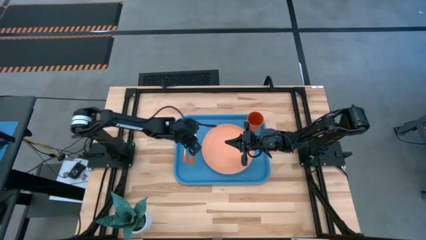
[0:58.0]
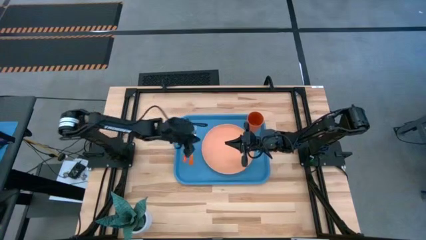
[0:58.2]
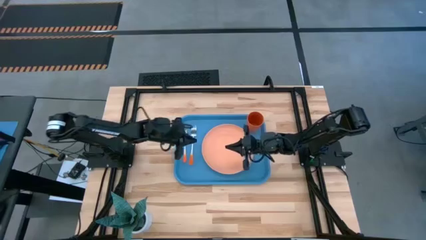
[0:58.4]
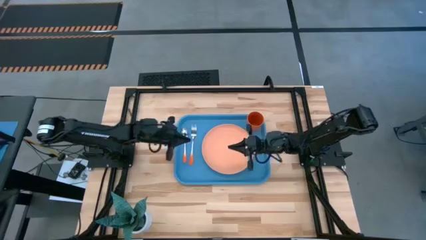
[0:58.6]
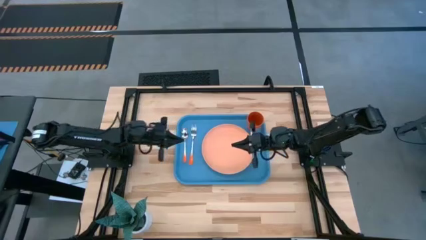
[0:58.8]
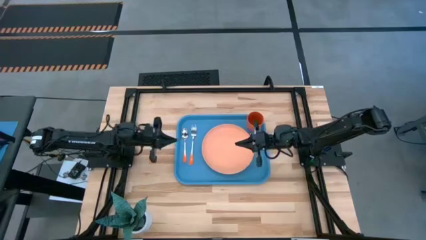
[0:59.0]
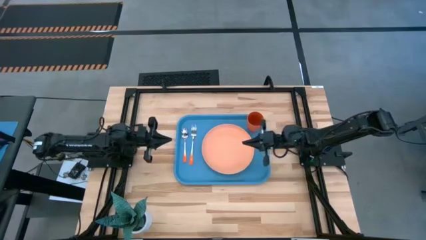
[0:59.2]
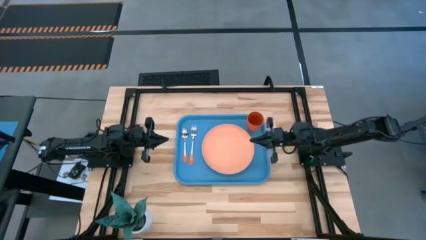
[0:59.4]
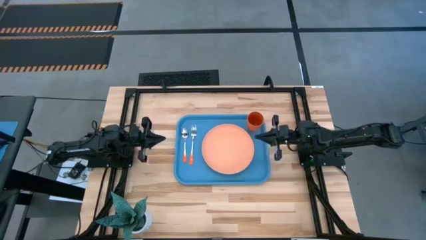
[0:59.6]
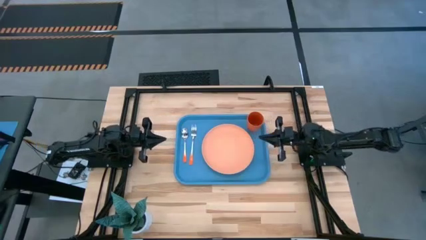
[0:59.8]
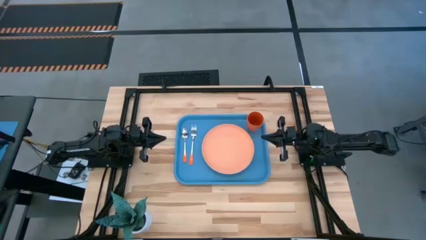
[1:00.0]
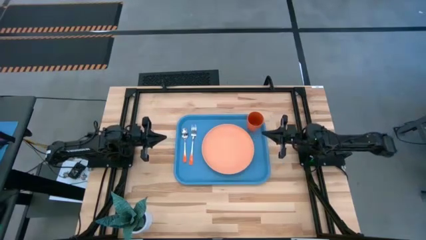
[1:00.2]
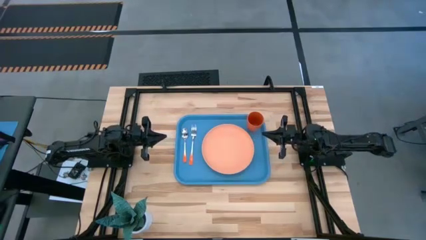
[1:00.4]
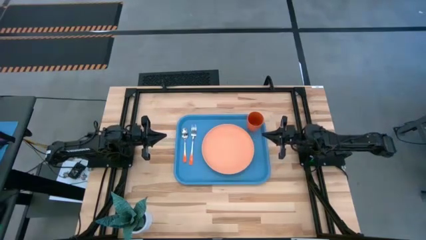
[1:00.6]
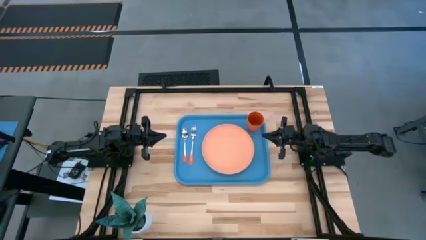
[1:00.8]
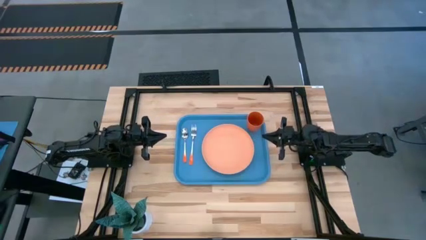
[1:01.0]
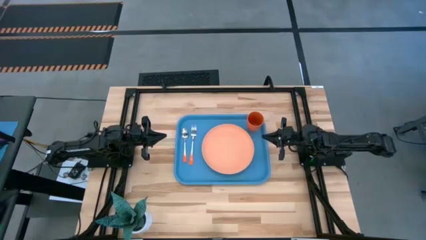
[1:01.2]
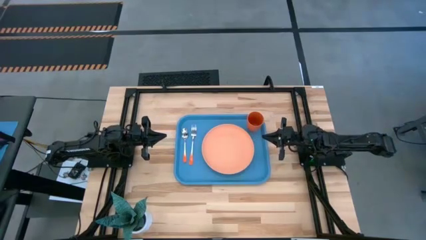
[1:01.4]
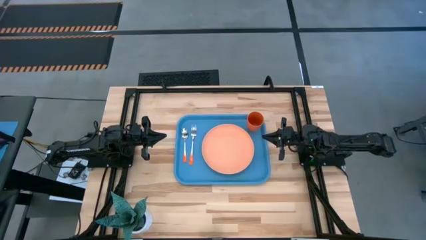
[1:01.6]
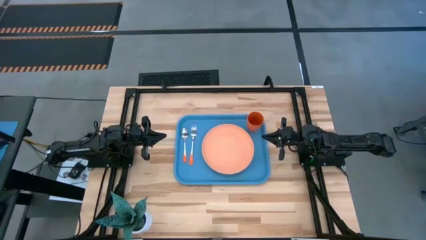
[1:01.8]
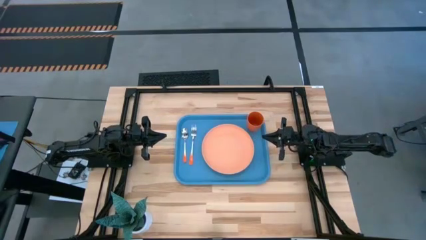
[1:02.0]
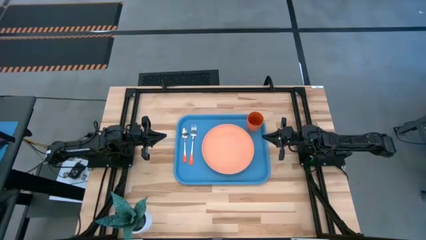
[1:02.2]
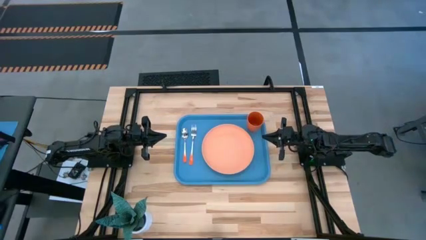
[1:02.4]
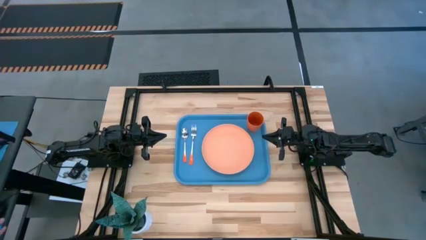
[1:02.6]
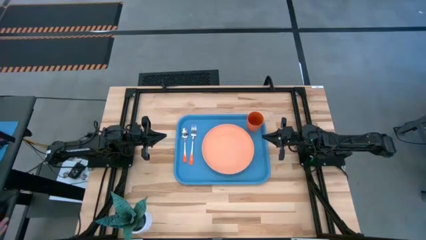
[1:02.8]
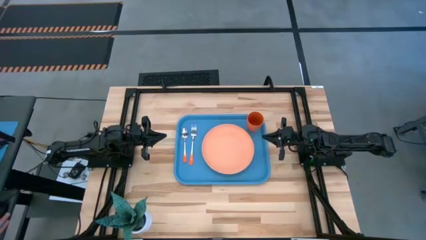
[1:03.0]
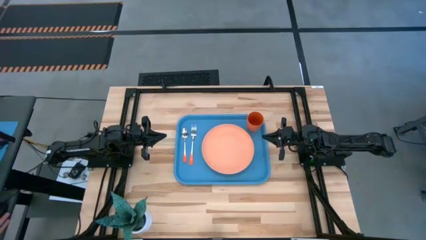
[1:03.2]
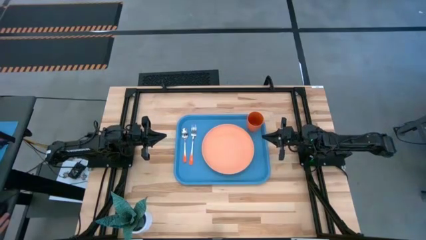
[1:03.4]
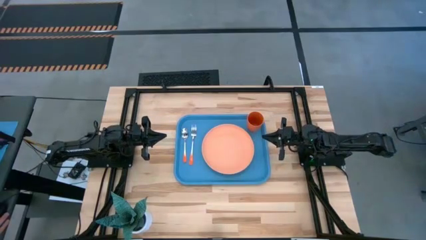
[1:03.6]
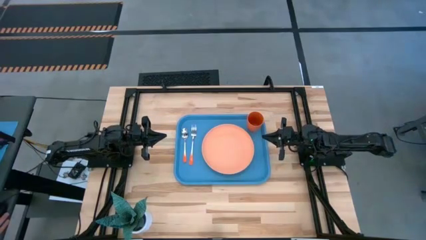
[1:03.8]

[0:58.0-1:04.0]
Task: Pick and place plate/cup/fork/spoon on tray
Return to Home Position

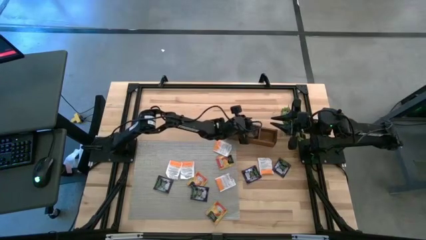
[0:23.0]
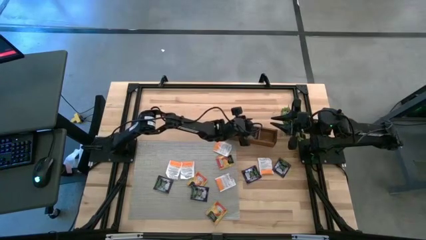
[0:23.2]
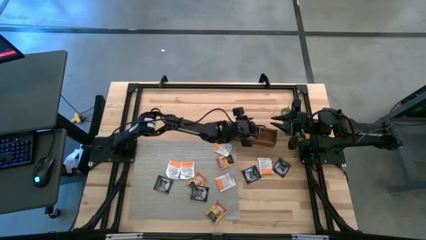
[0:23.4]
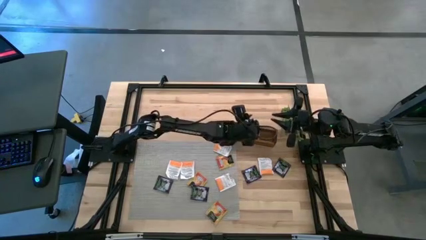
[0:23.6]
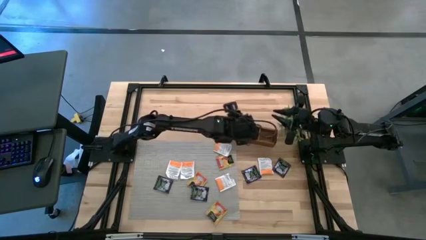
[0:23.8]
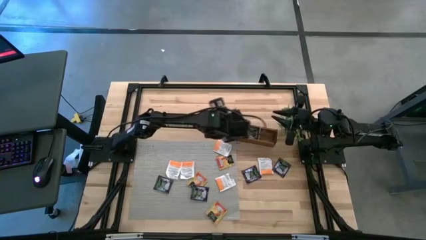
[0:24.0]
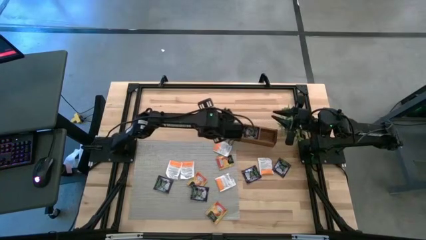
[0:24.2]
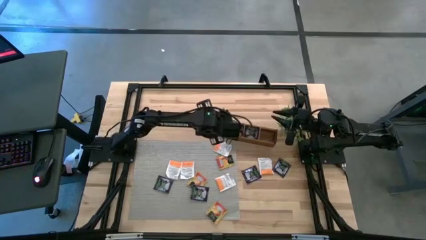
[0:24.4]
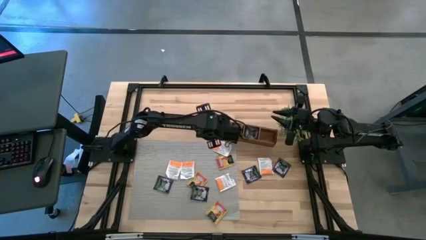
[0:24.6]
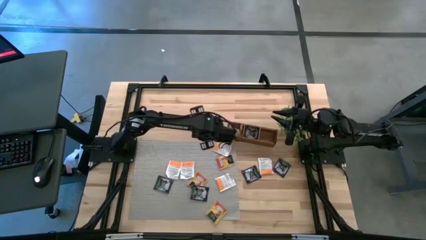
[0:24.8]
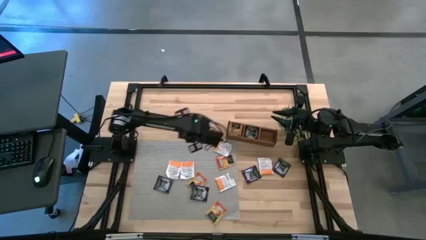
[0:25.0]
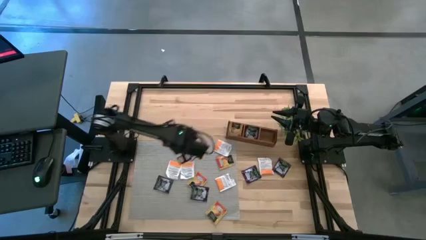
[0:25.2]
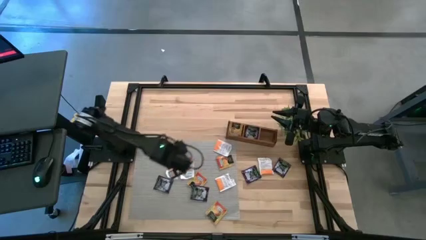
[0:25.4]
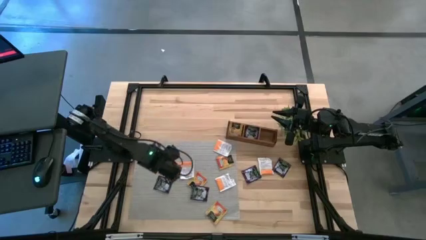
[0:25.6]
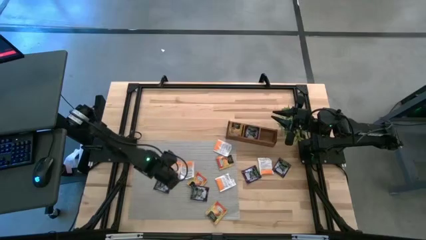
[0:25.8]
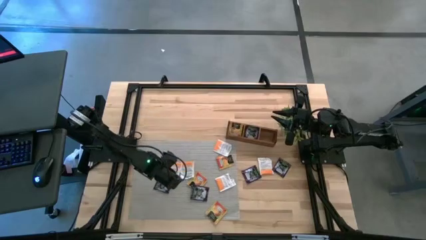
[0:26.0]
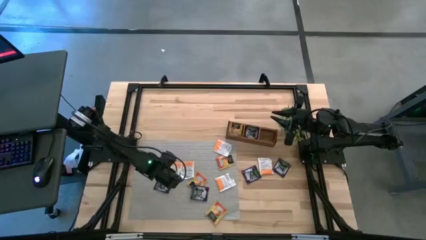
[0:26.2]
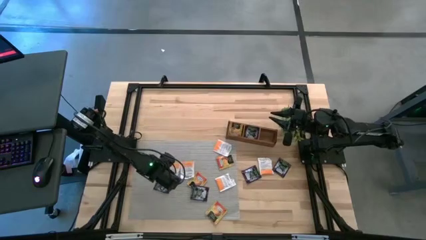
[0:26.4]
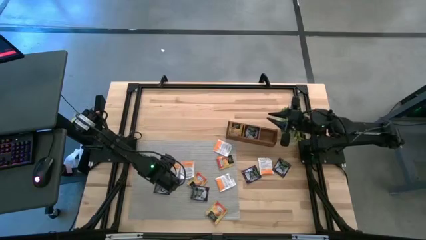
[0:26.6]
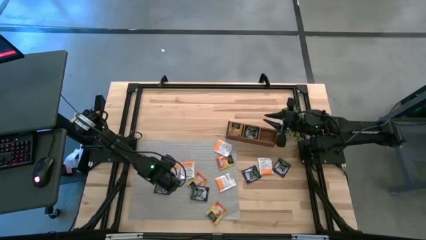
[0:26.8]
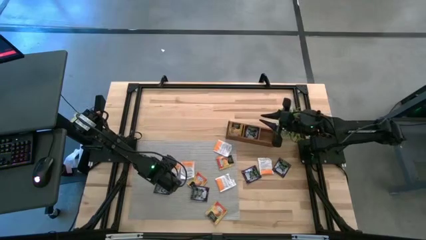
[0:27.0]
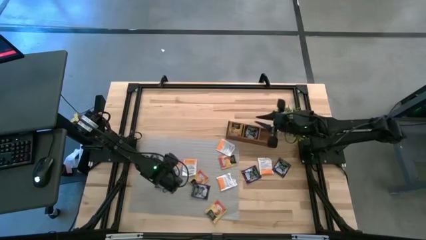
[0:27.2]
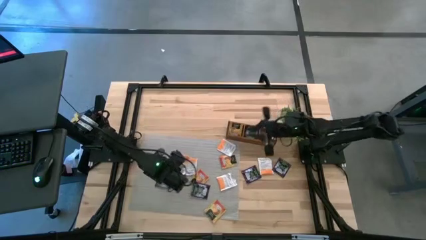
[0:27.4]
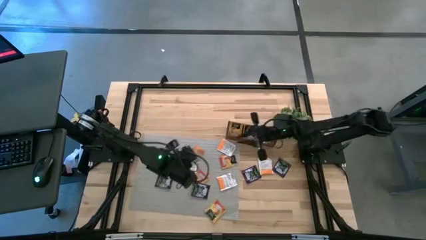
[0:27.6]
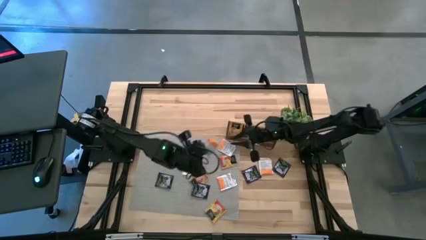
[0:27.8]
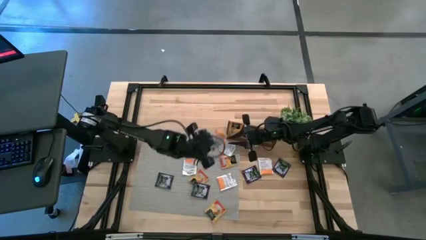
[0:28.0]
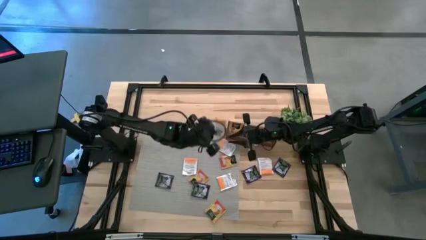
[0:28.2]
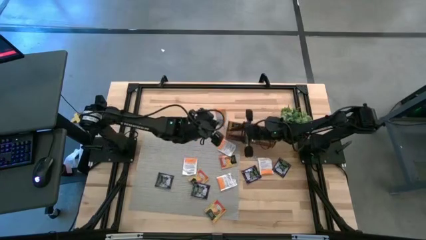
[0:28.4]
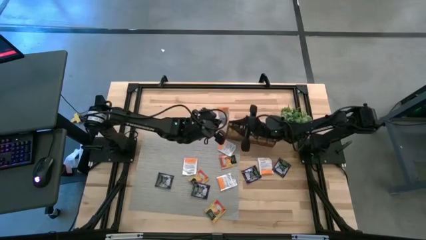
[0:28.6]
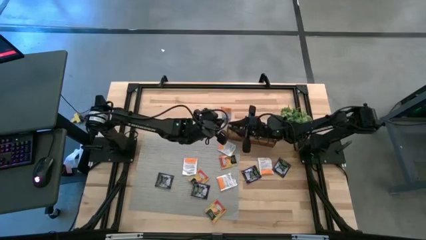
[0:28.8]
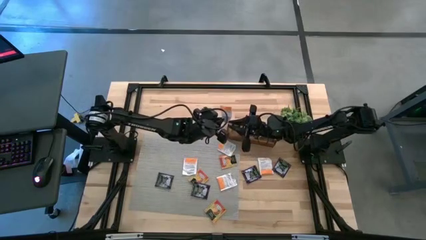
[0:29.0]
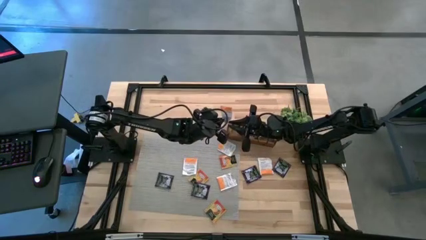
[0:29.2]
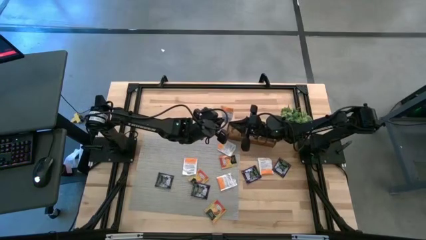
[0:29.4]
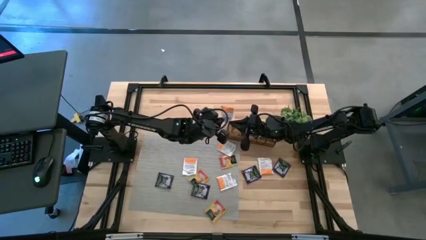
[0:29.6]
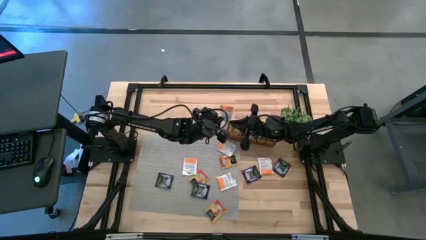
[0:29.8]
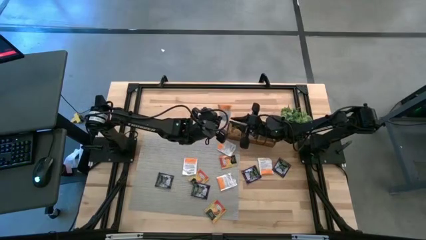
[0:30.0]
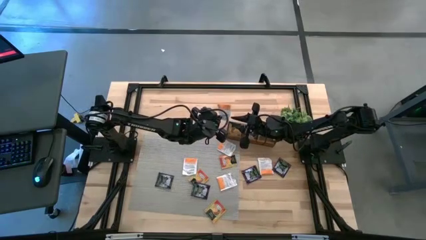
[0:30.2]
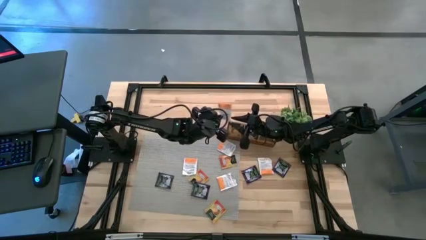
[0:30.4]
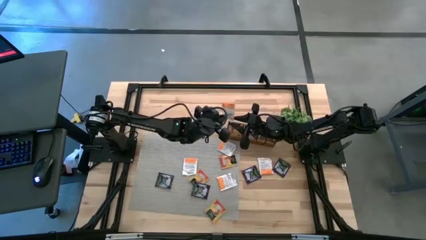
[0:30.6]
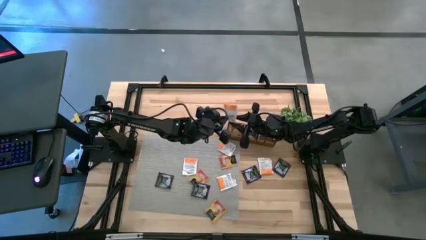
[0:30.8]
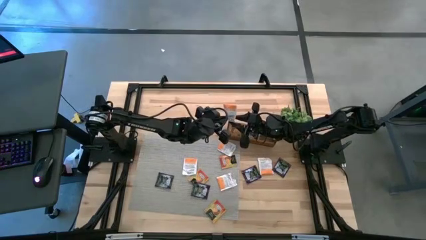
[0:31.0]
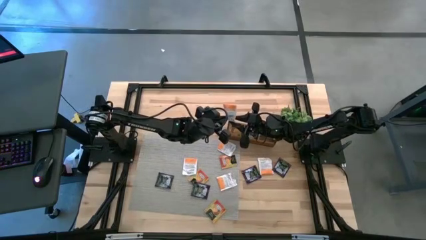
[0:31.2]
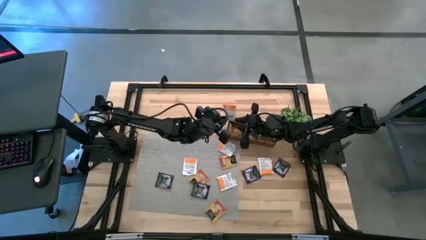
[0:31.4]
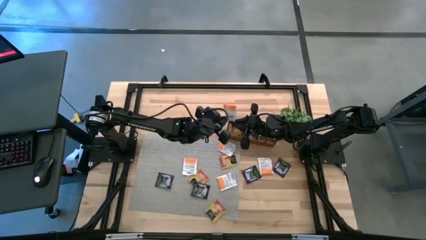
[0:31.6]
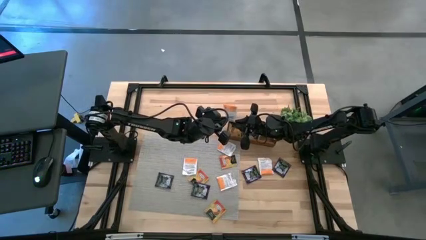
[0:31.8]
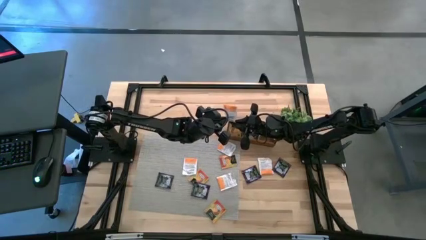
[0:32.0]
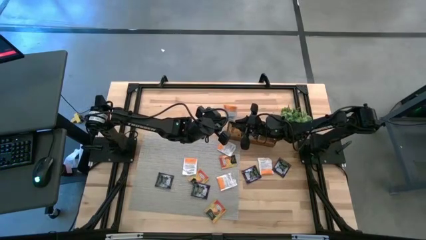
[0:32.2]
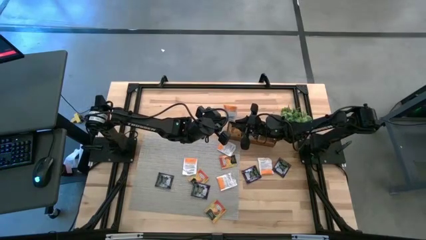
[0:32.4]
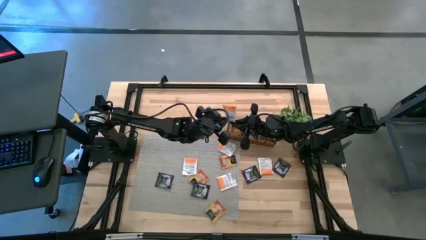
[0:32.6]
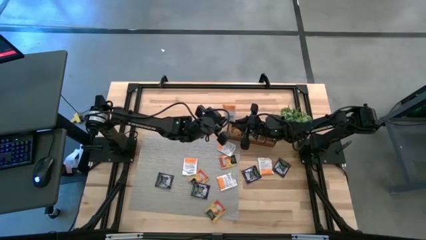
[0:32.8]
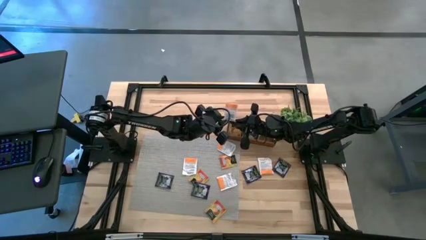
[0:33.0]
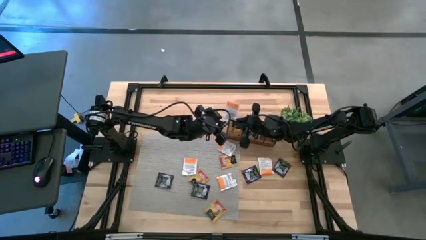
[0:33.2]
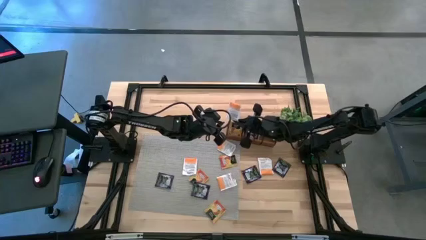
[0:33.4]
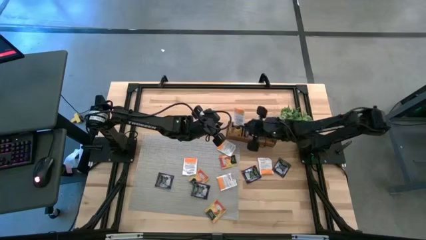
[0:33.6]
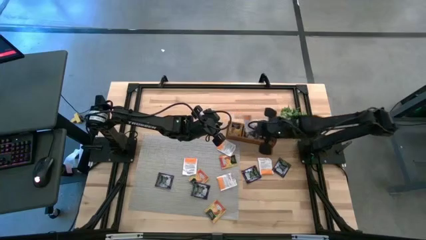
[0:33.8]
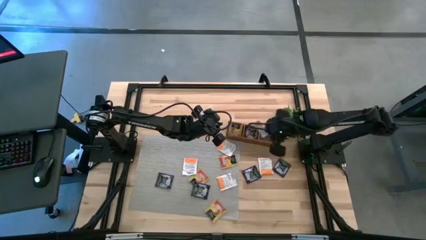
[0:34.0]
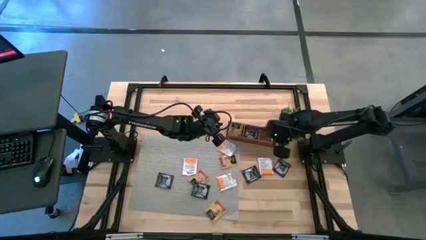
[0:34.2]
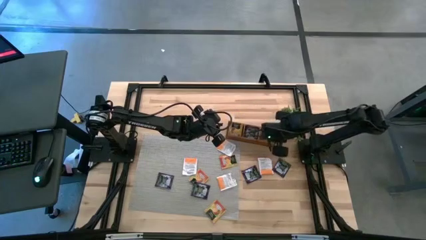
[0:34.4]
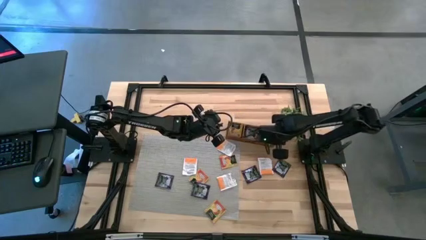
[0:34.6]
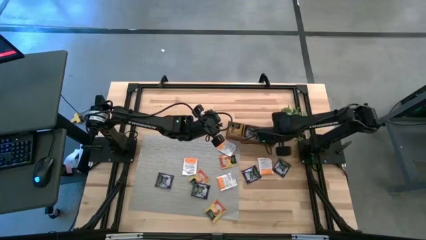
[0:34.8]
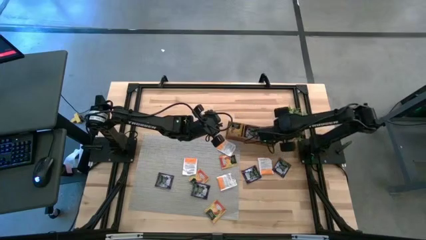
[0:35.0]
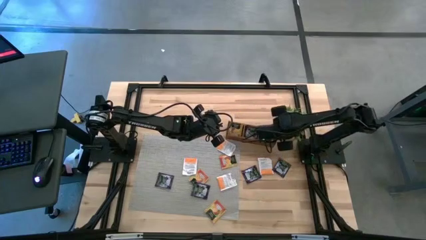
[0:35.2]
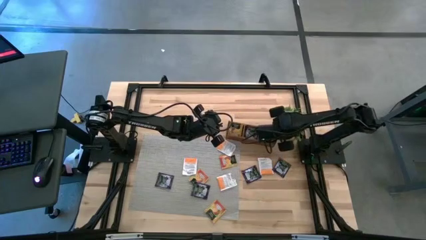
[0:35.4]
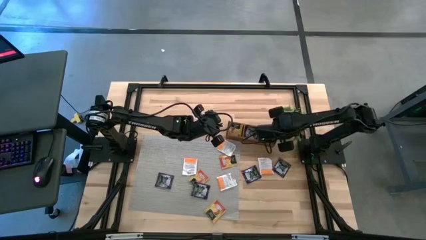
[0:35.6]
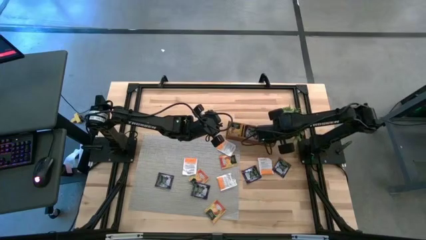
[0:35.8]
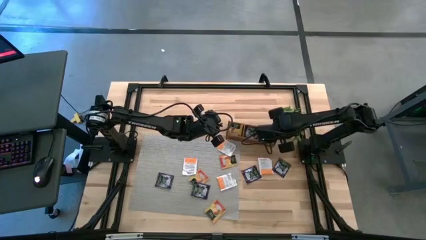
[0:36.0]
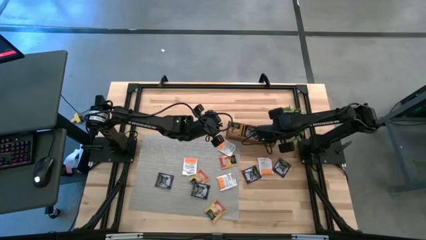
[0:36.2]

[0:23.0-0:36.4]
Task: Pick & Place Tea
Put the white orange tea bag in the right section of the wooden organizer
